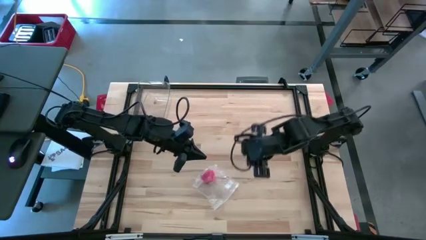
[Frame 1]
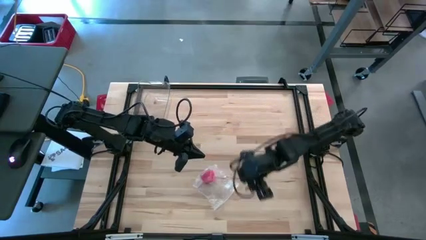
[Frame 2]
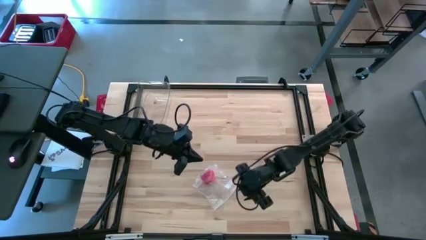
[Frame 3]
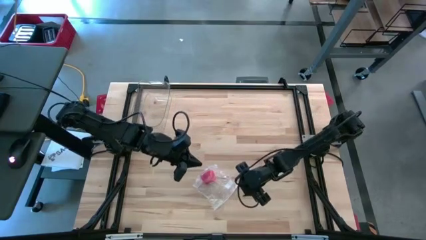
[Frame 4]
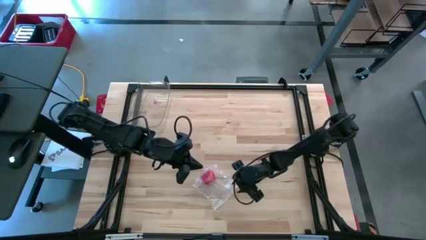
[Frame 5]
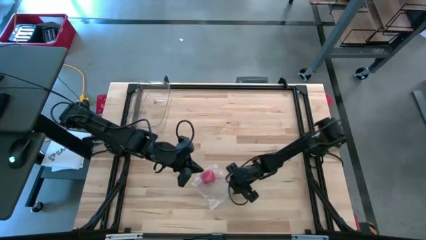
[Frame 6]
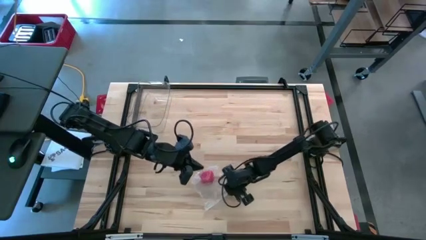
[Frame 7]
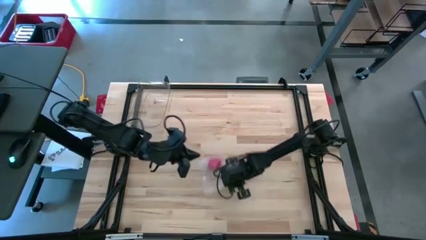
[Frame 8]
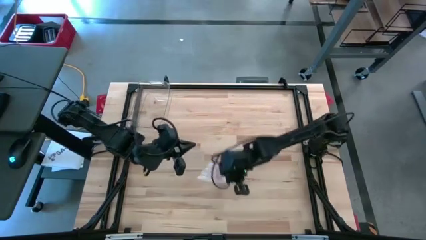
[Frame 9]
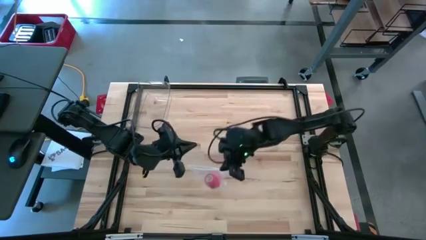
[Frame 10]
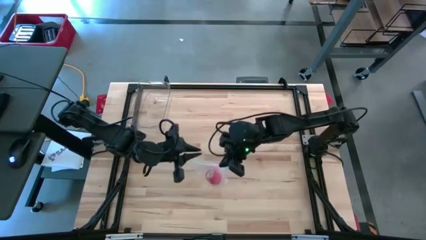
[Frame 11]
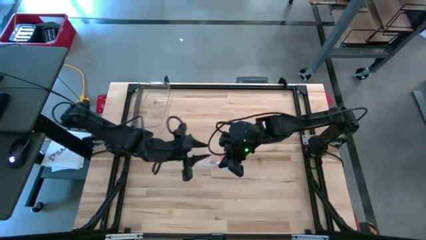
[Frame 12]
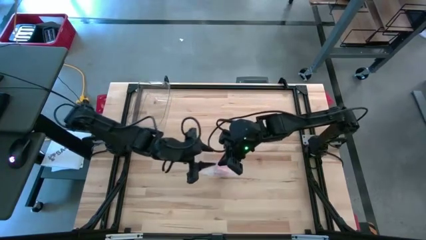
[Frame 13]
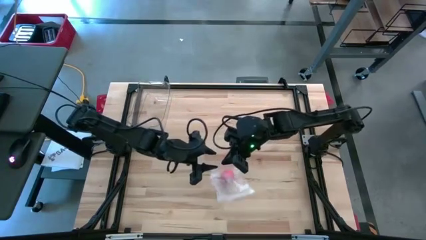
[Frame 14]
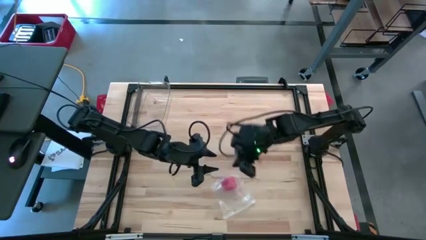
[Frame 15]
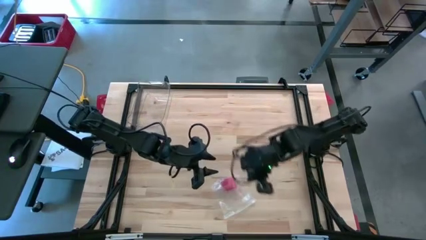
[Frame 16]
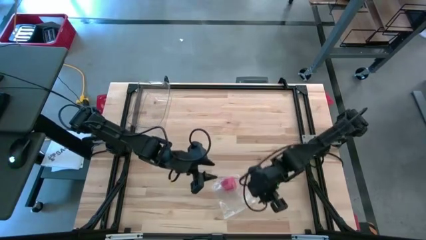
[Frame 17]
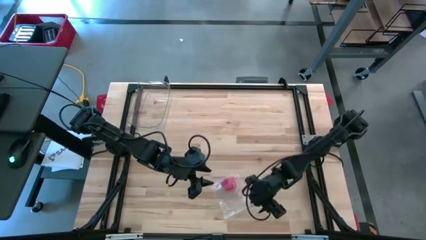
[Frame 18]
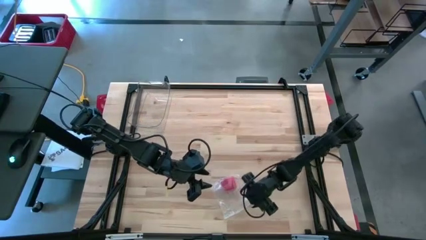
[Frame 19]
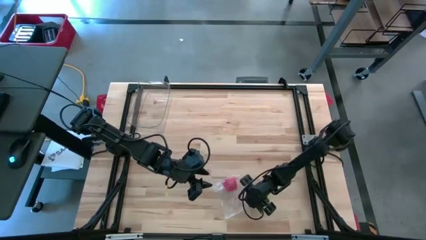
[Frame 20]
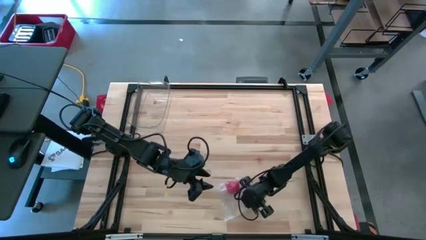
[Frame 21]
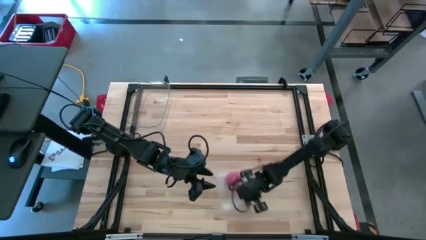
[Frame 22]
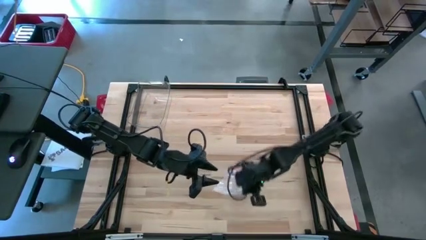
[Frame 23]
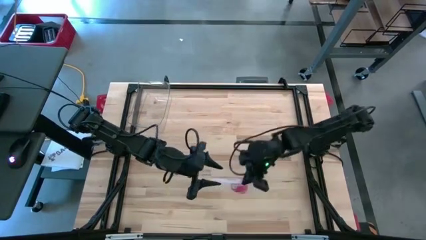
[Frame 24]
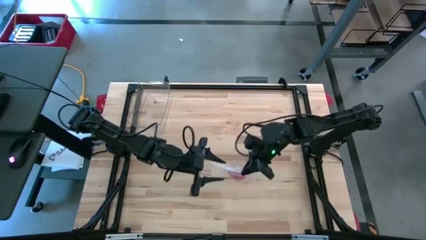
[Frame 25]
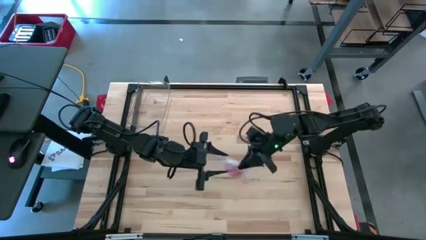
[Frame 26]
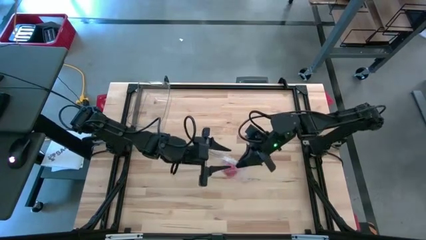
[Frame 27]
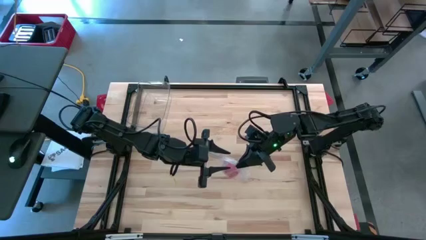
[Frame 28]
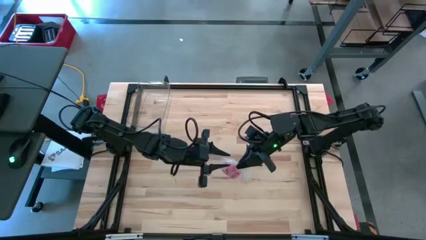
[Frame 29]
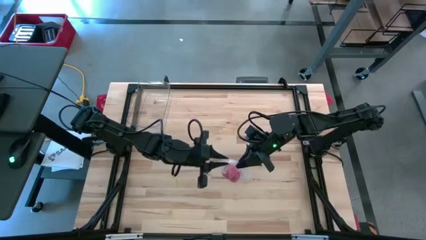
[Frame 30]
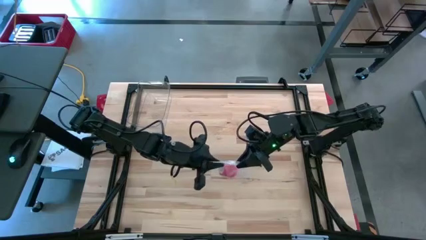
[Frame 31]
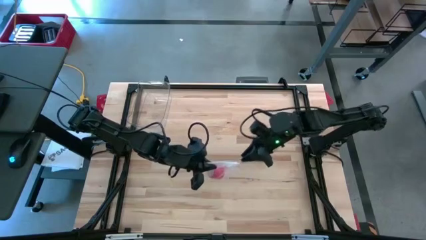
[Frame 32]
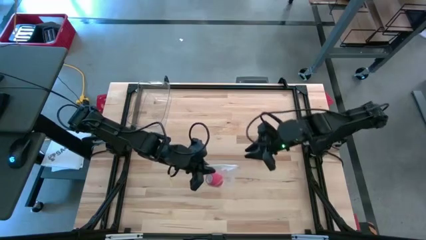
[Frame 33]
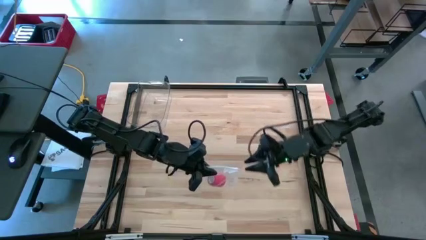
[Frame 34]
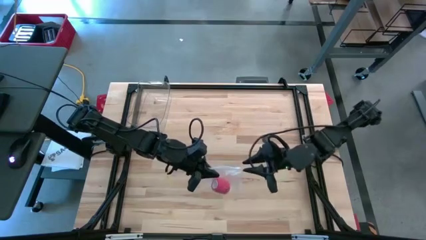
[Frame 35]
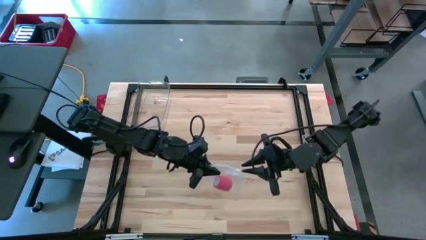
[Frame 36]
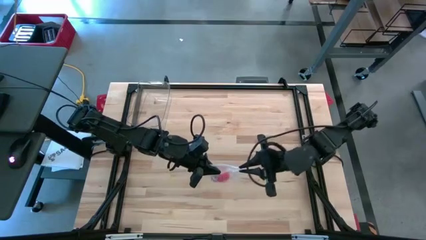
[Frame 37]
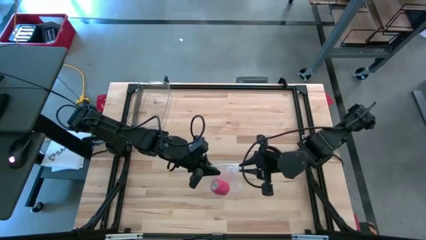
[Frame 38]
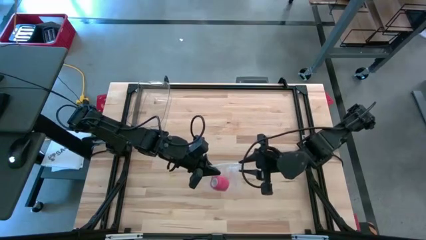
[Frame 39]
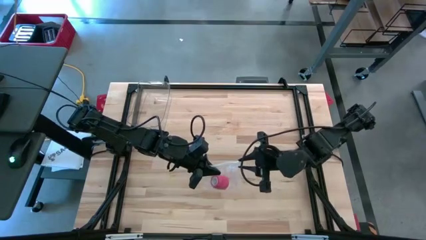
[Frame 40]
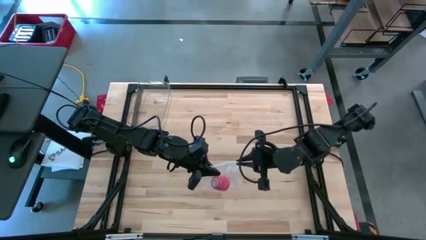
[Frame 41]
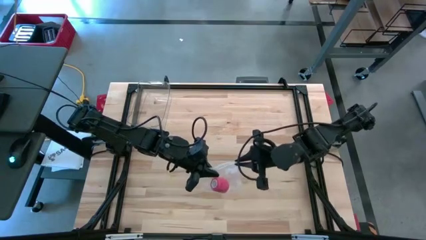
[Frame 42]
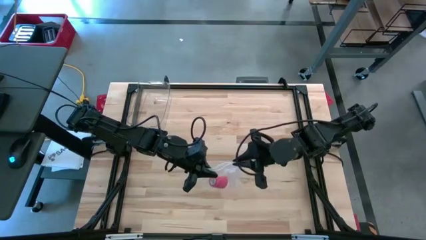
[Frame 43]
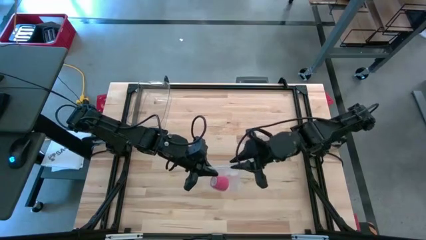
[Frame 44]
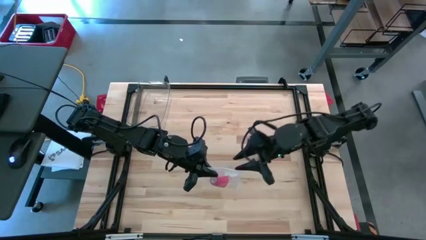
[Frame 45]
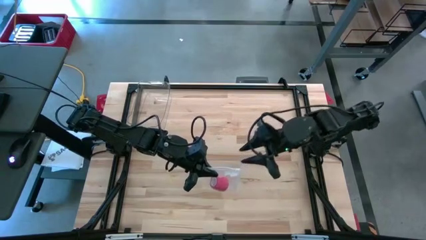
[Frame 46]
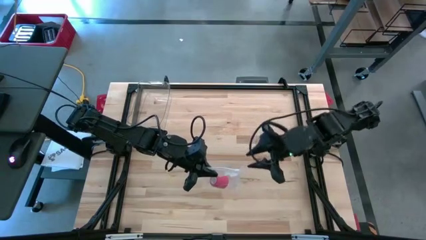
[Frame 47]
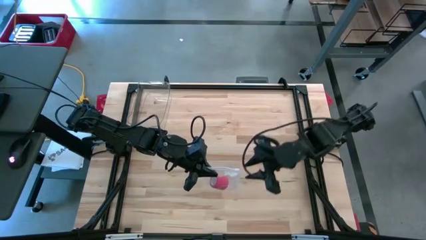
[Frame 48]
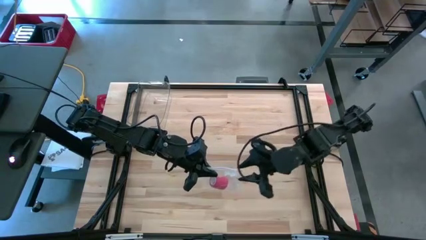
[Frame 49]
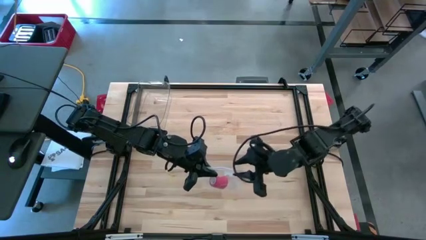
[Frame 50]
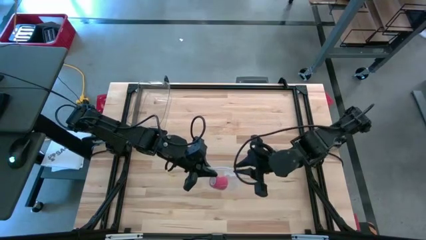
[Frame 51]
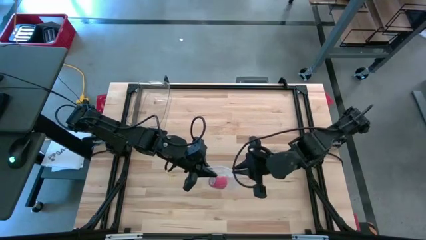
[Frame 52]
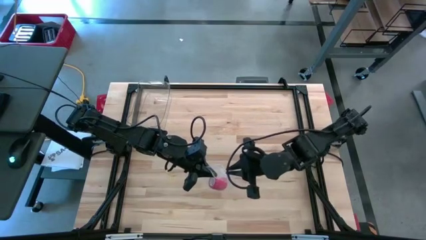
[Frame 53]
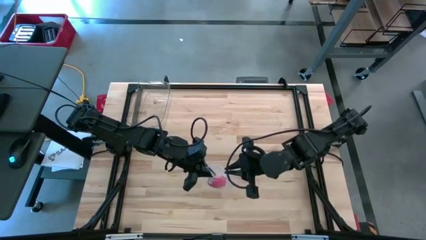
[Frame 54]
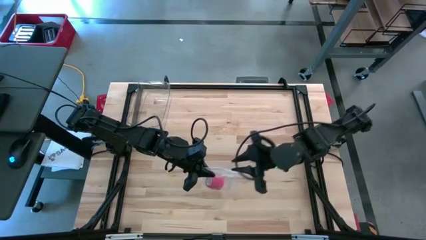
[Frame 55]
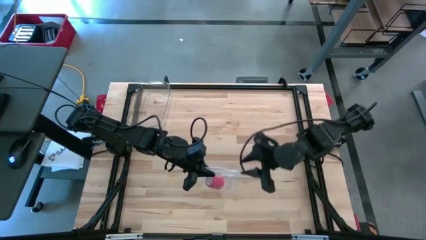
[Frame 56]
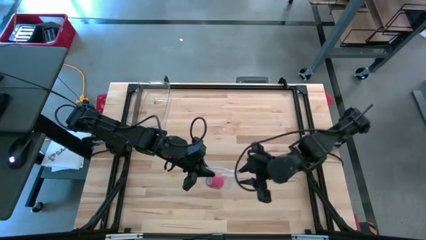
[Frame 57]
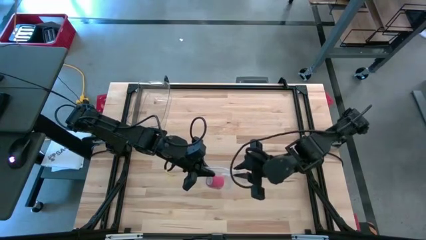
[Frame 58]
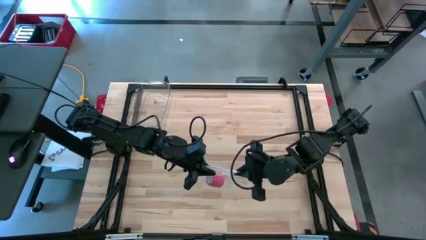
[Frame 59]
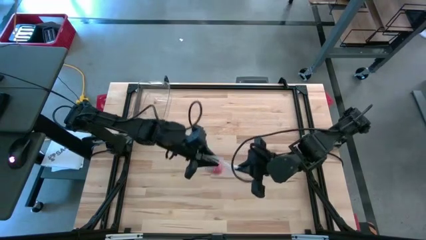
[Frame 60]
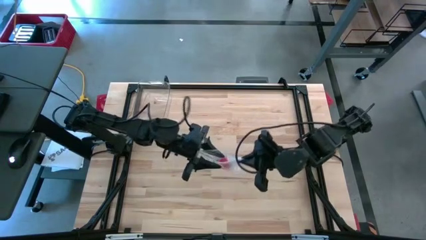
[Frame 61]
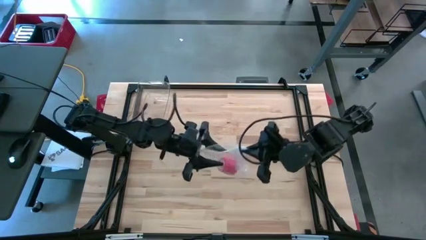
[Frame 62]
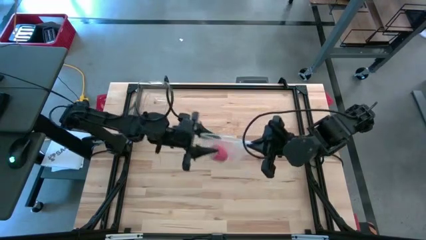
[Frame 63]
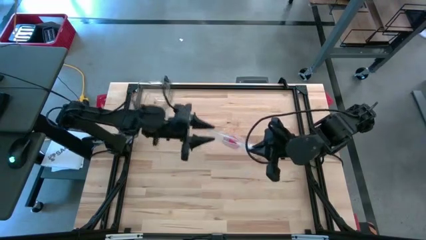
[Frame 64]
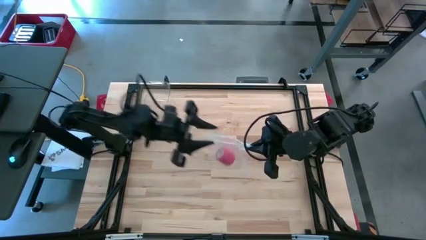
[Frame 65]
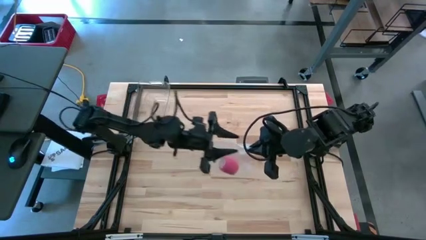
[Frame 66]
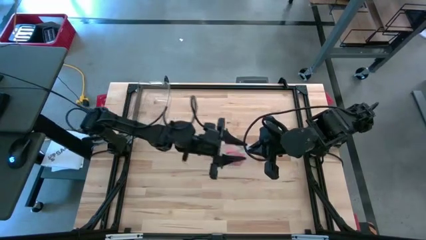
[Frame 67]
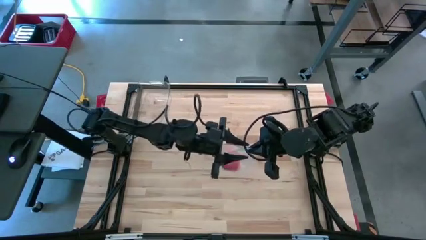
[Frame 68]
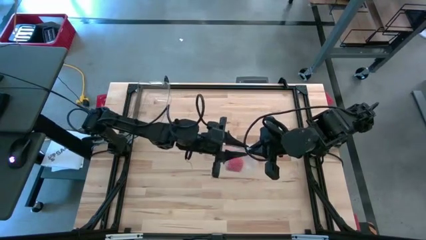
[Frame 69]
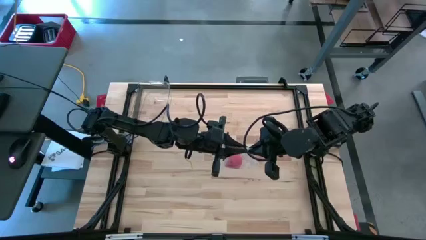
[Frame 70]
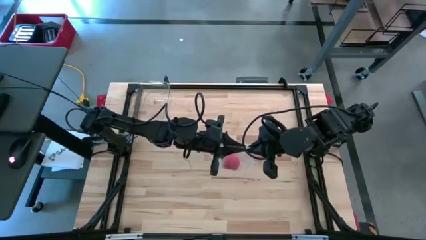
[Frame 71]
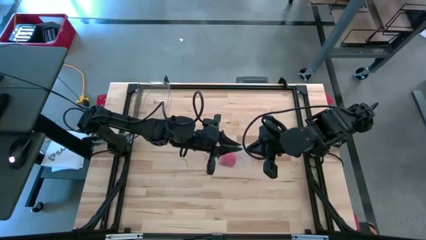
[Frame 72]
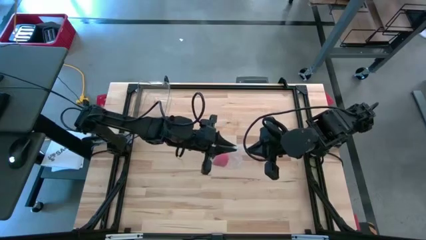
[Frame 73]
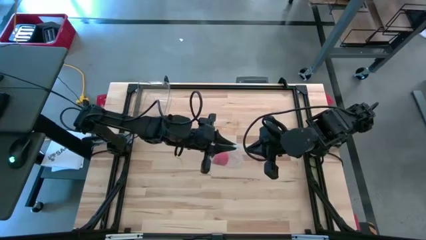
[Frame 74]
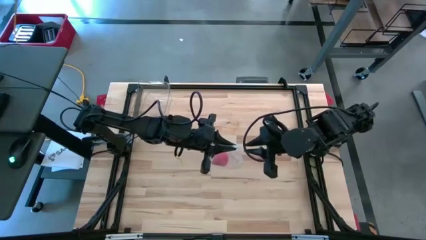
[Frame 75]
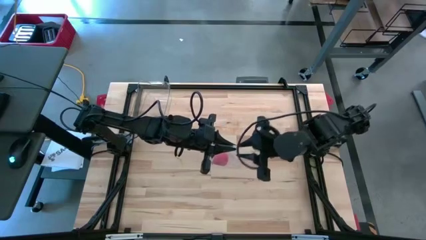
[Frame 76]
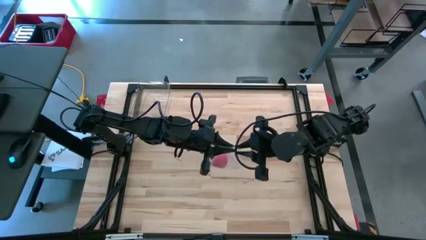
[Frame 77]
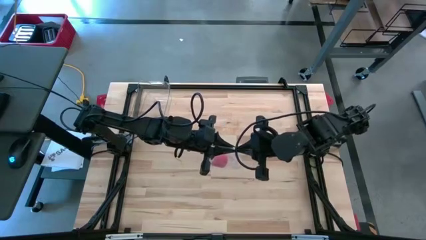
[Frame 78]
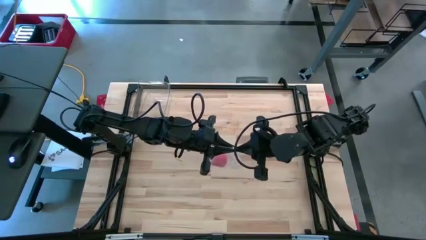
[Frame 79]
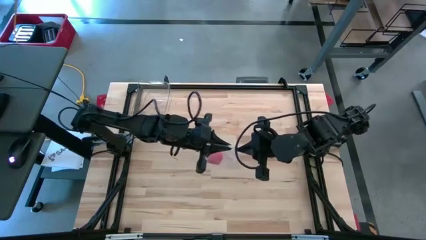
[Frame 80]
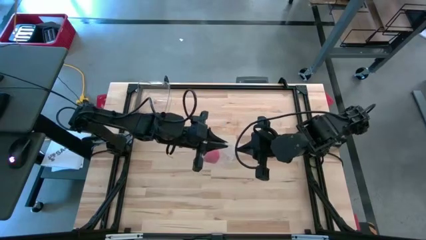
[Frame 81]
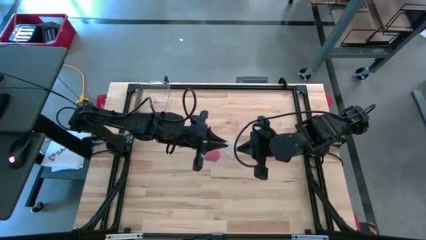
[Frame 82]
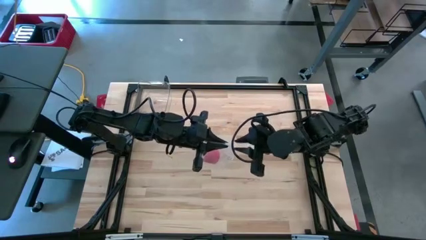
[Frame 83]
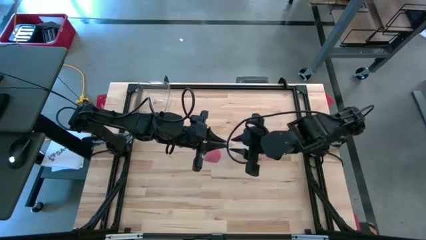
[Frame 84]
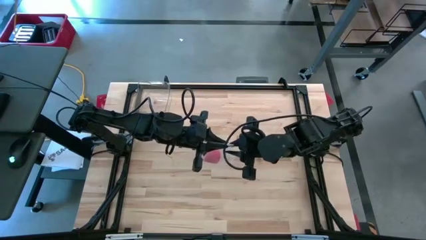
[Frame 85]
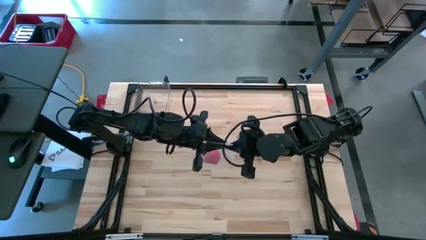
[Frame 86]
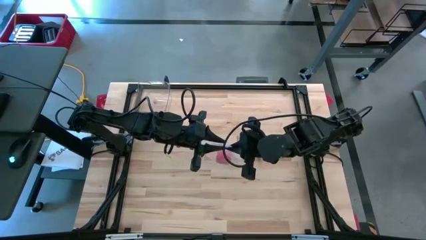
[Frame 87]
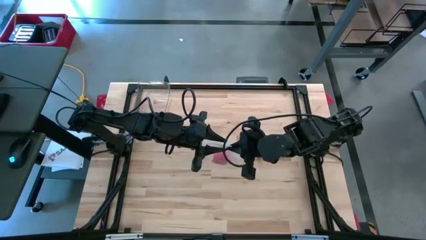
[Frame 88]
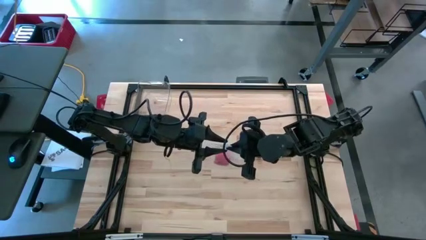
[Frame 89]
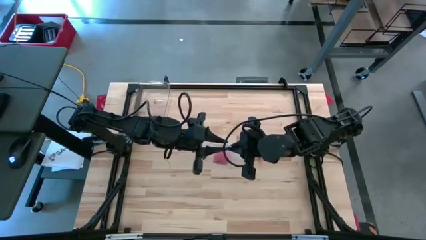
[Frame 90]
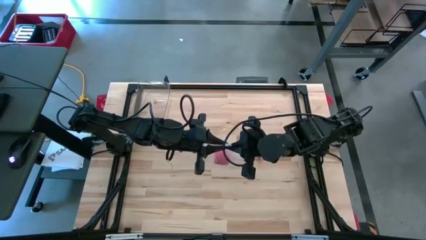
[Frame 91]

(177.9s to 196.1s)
Task: Roll bandage
Close the transparent zip bag
